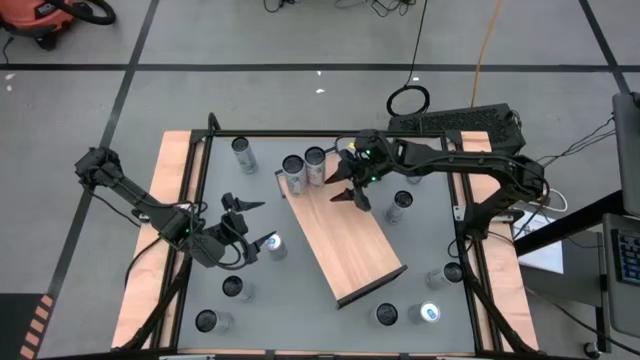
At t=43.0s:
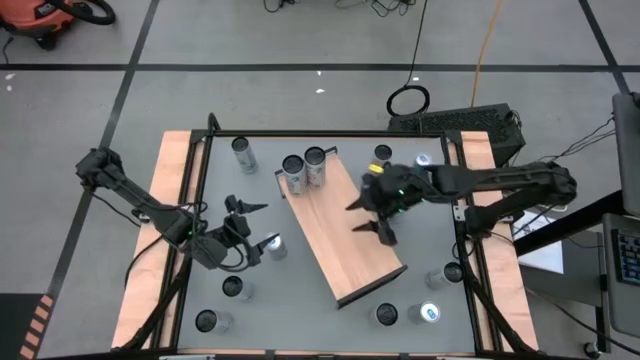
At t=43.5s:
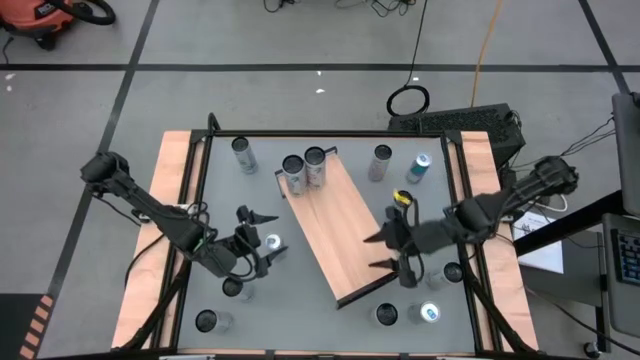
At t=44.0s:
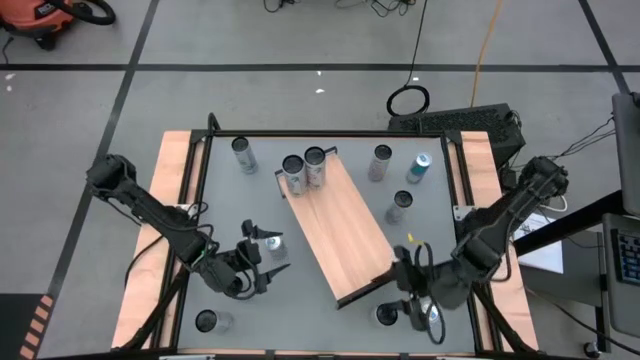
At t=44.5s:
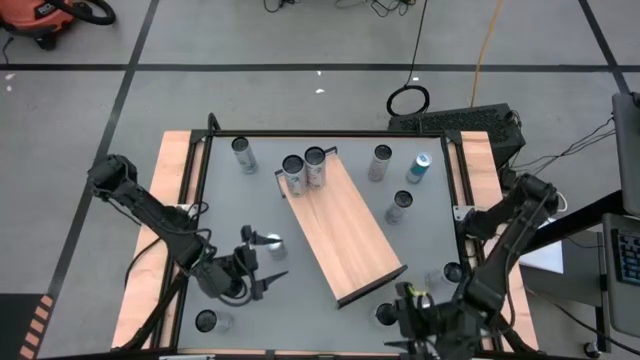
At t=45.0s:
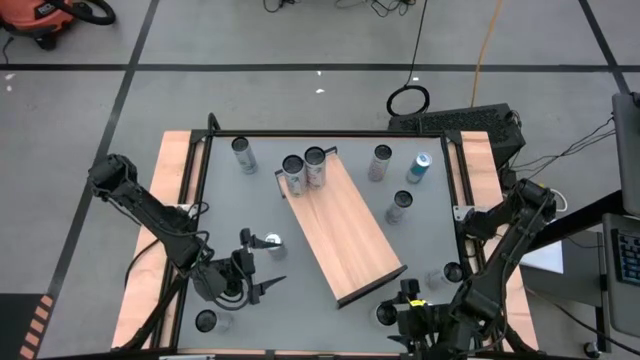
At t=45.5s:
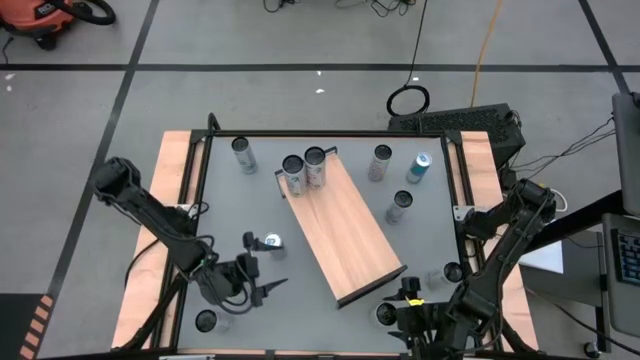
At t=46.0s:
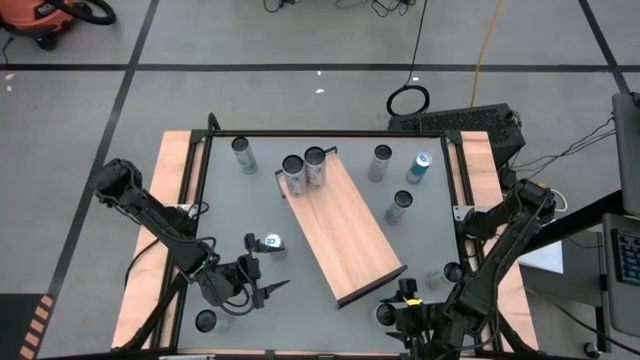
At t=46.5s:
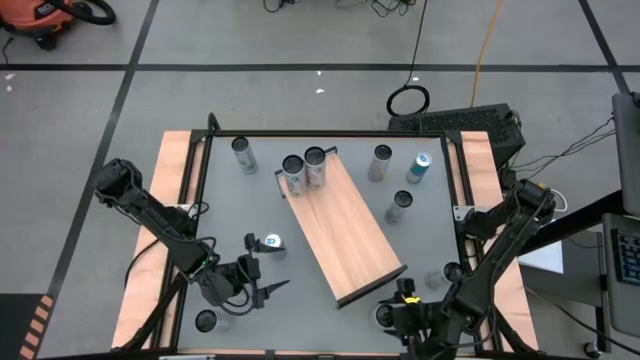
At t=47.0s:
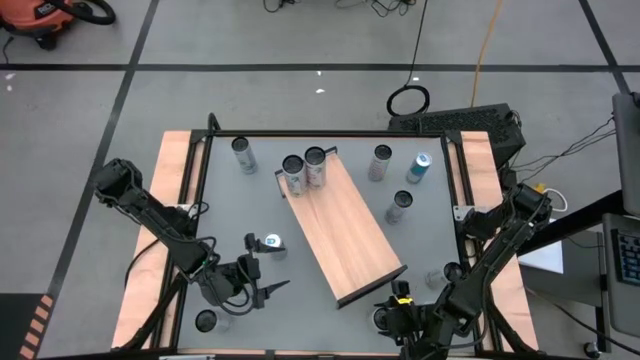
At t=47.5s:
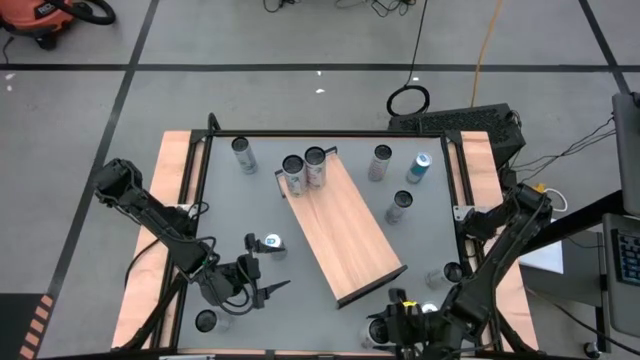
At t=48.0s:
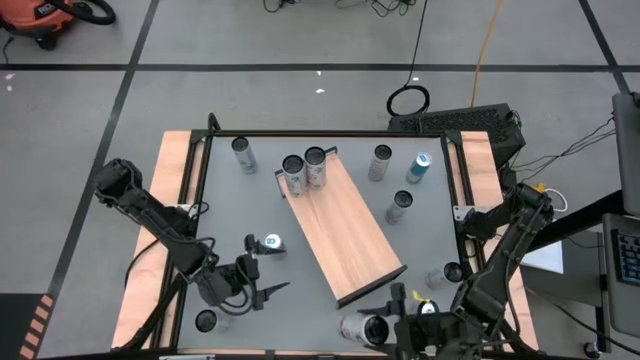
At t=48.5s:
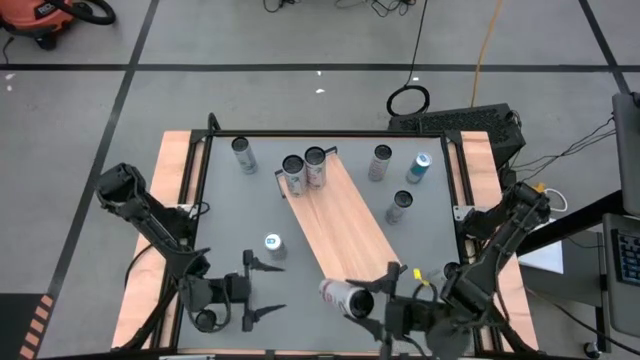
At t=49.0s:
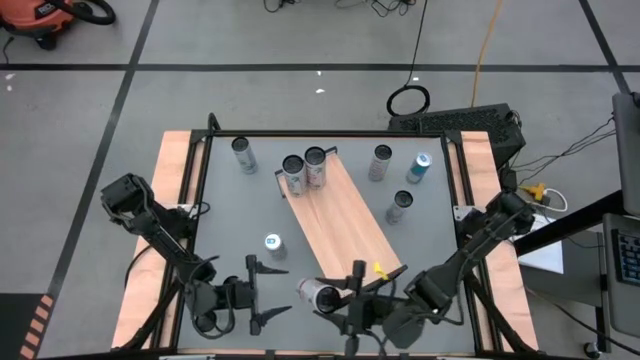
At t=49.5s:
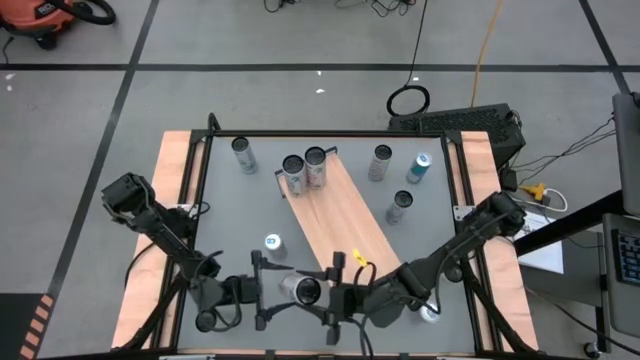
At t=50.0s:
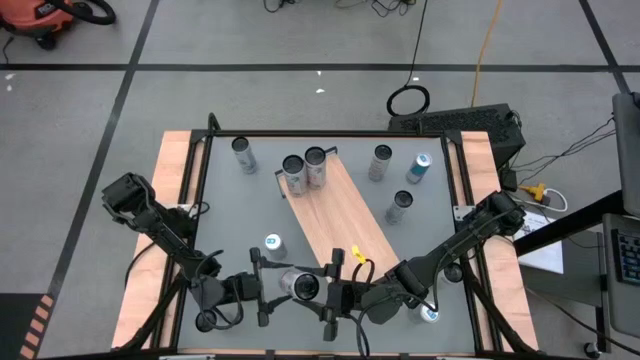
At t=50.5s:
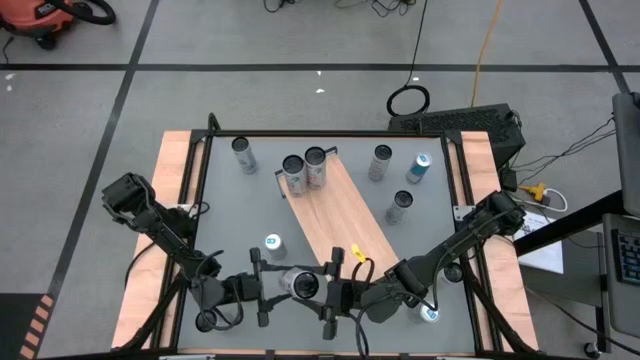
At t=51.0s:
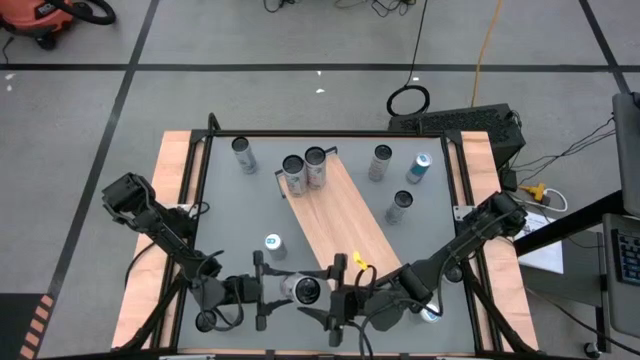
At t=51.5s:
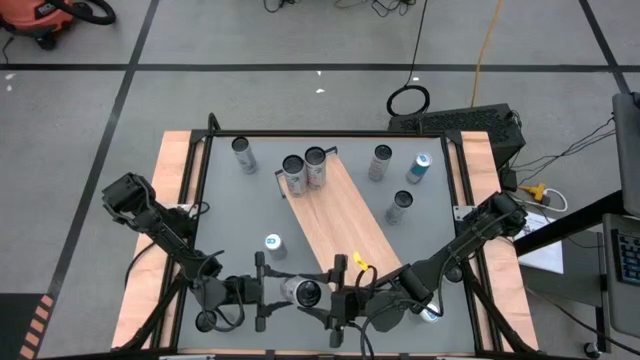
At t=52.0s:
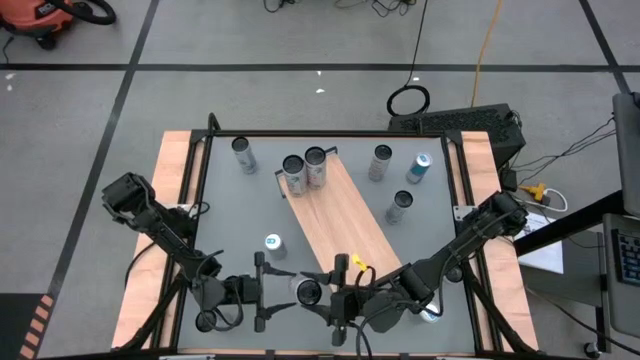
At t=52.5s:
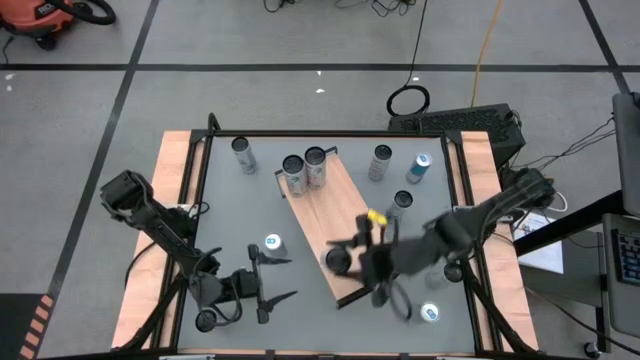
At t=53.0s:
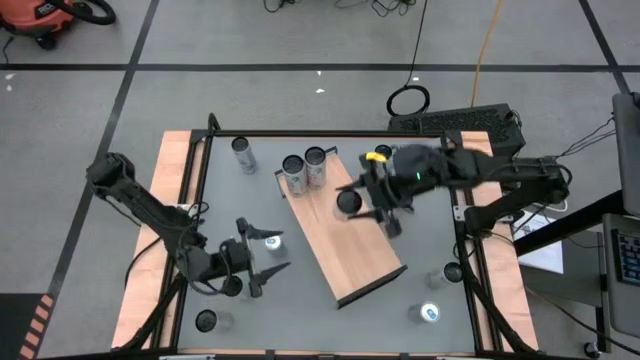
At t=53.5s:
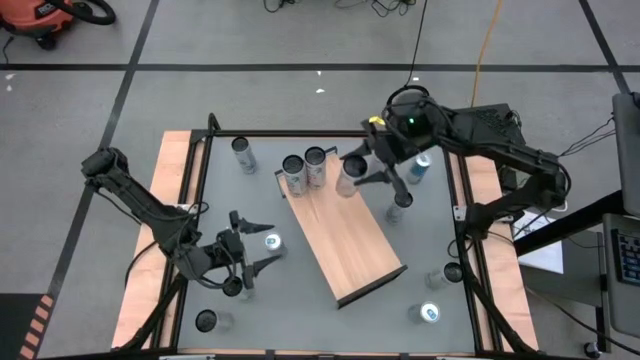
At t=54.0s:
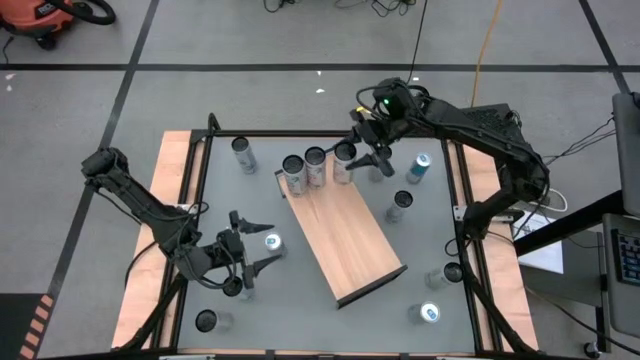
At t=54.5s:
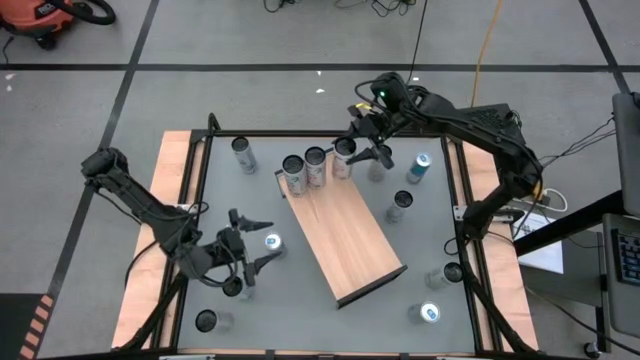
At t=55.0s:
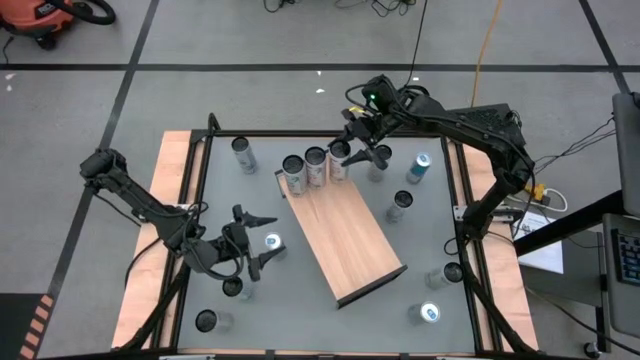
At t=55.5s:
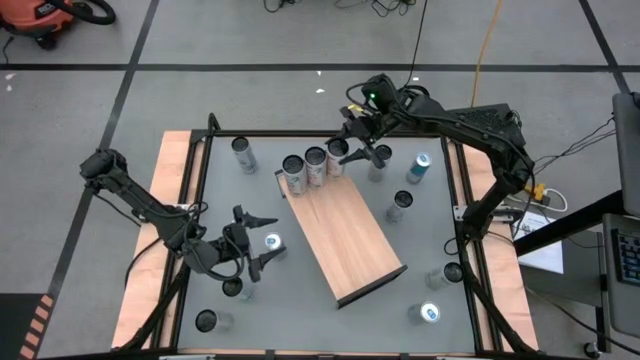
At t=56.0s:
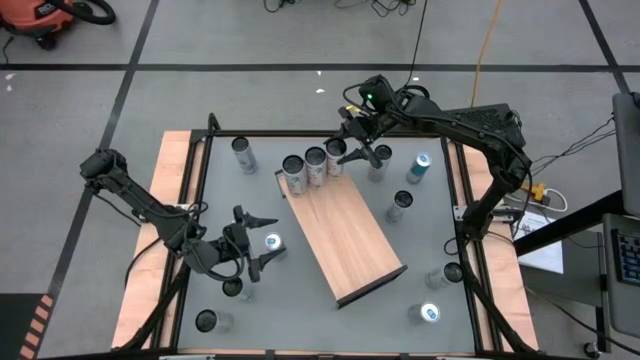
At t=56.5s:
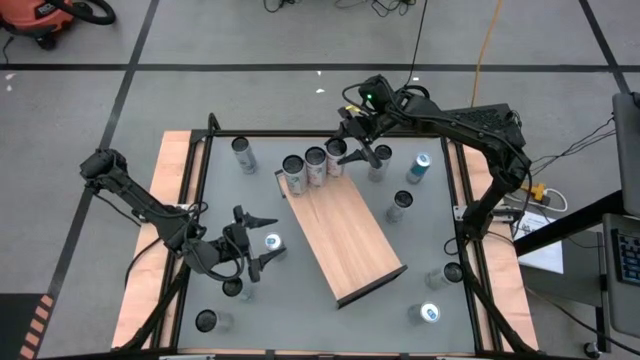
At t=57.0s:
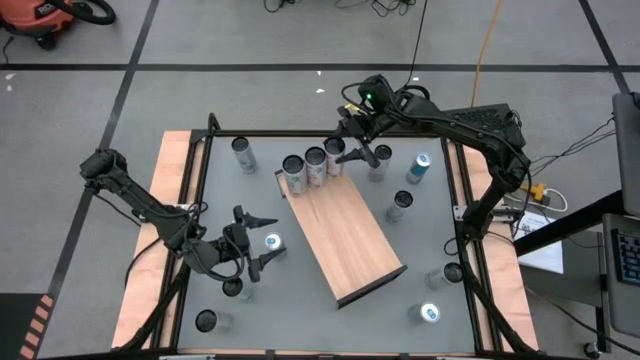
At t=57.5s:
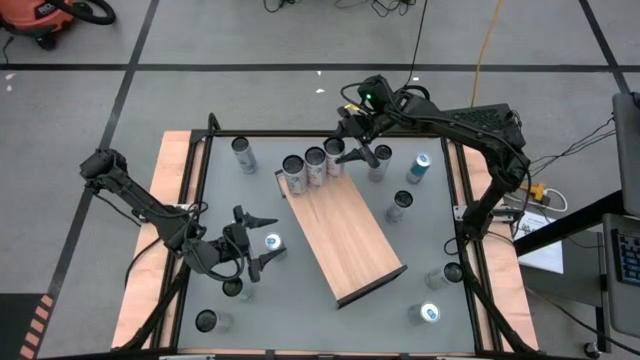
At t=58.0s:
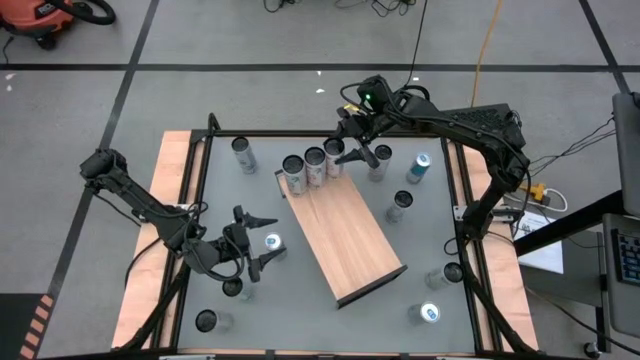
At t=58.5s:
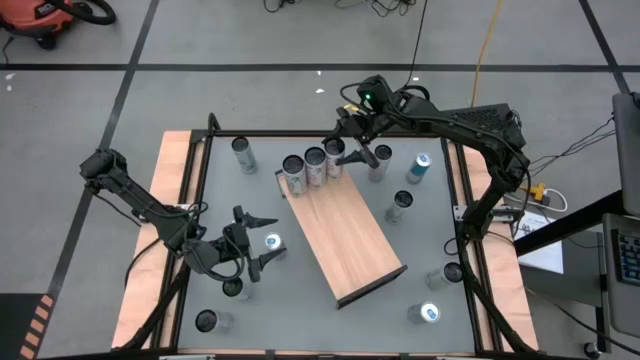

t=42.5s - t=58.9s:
Task: Place canned beverage on shelf
Put the white-pink soda can on the shelf aligned with the other white-pink soda cans
